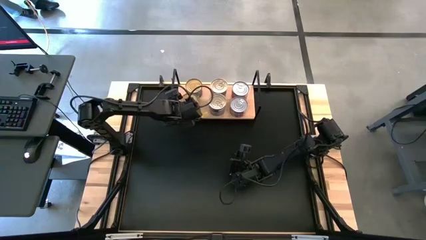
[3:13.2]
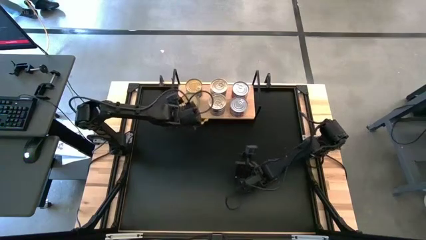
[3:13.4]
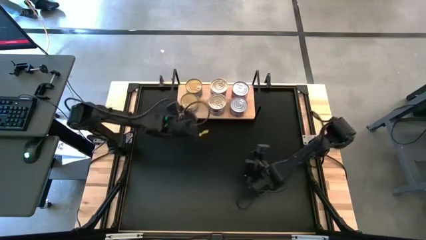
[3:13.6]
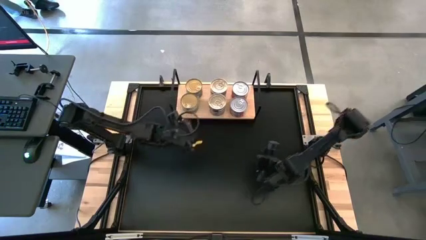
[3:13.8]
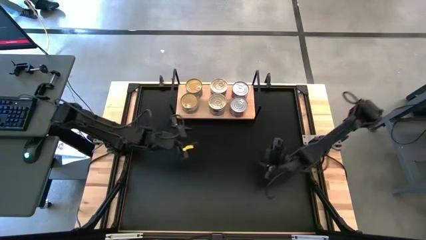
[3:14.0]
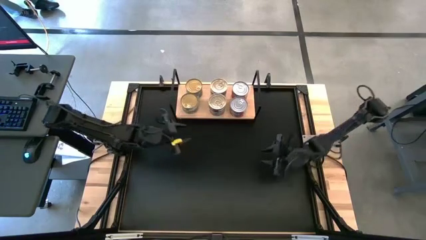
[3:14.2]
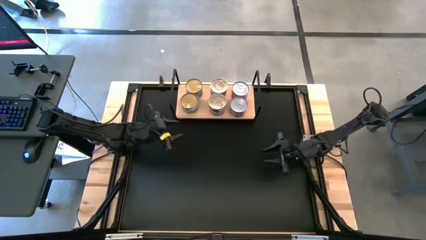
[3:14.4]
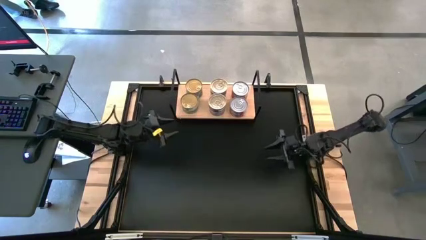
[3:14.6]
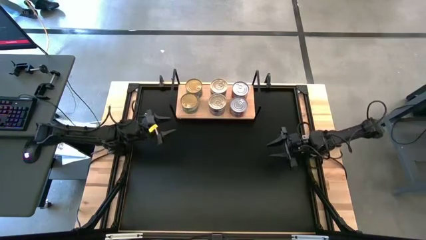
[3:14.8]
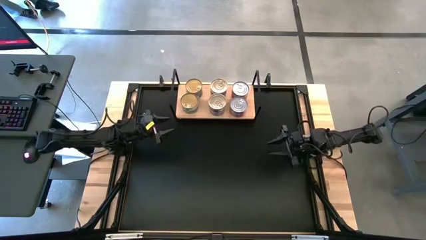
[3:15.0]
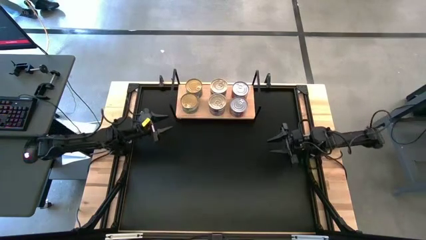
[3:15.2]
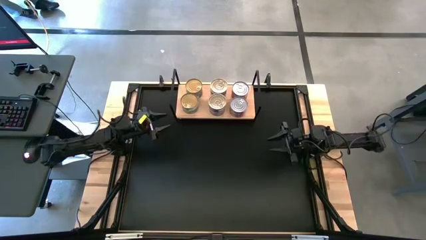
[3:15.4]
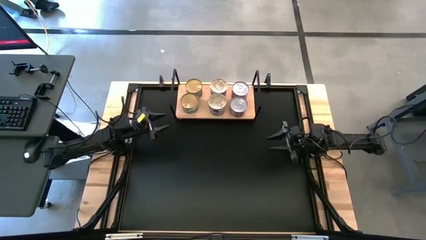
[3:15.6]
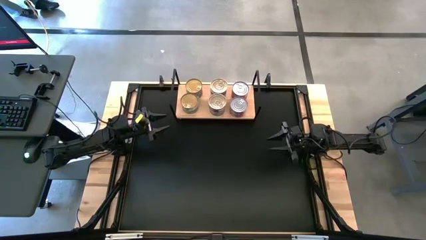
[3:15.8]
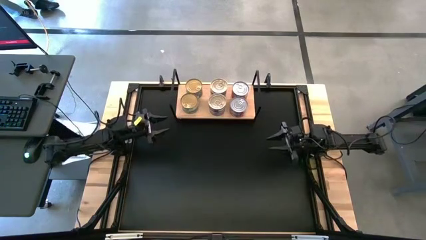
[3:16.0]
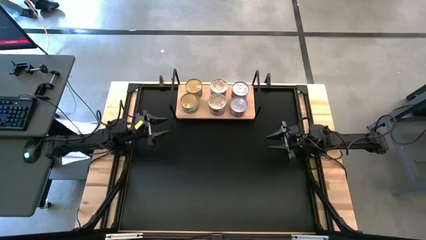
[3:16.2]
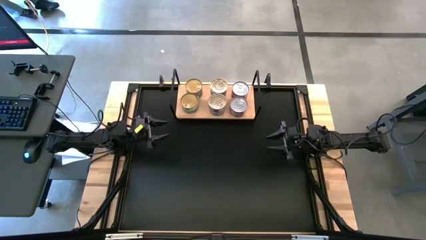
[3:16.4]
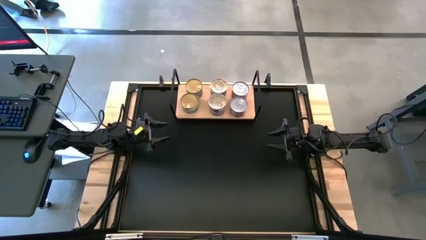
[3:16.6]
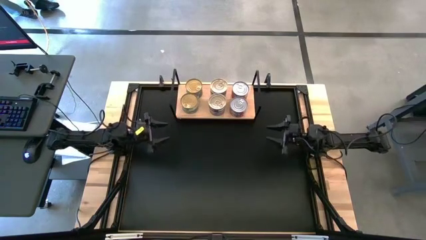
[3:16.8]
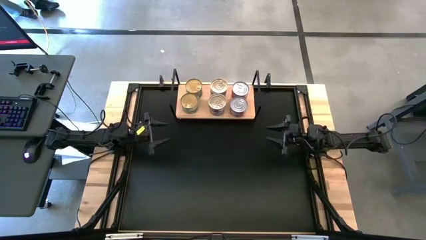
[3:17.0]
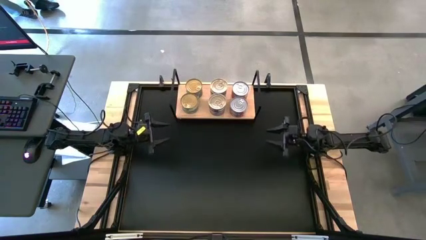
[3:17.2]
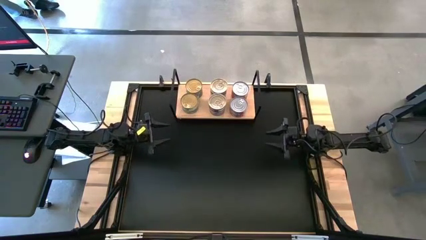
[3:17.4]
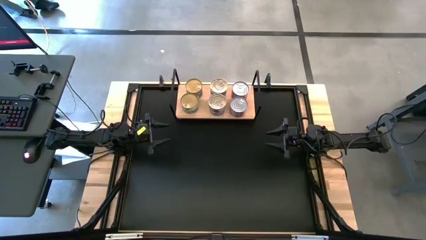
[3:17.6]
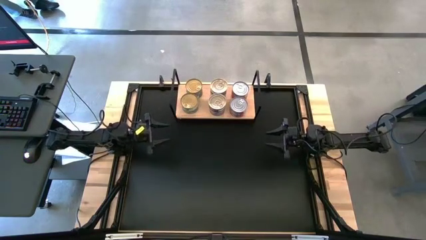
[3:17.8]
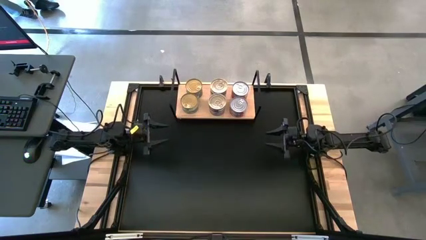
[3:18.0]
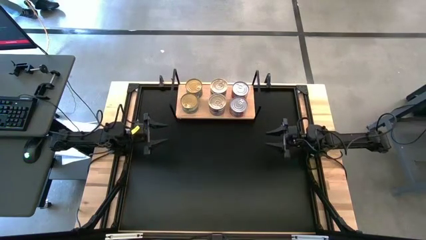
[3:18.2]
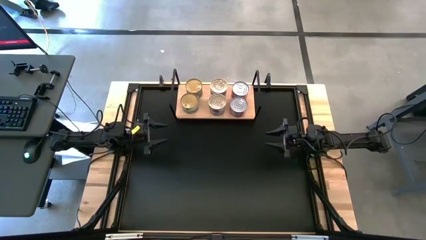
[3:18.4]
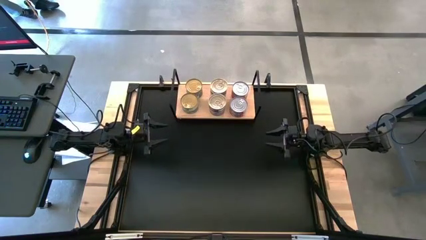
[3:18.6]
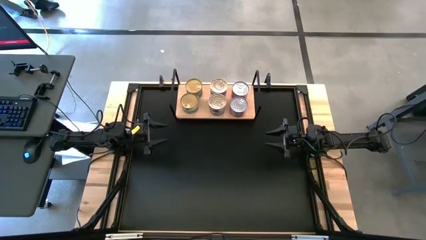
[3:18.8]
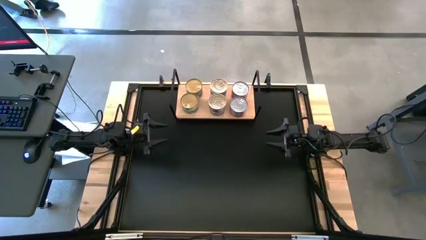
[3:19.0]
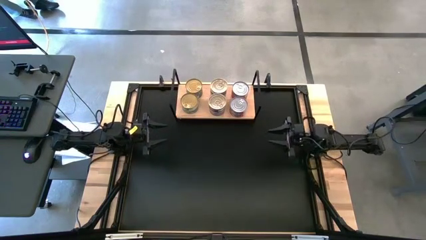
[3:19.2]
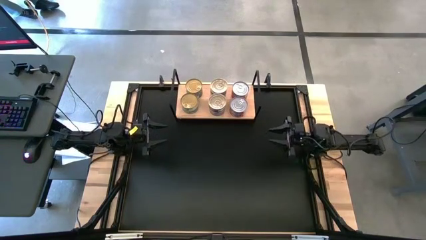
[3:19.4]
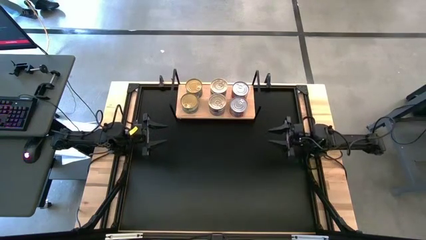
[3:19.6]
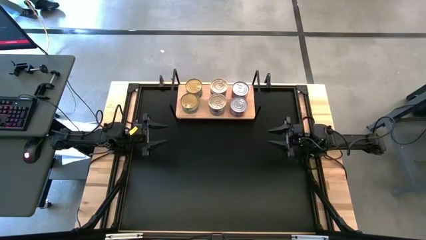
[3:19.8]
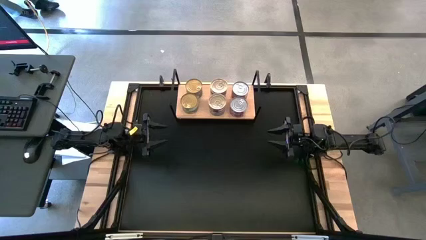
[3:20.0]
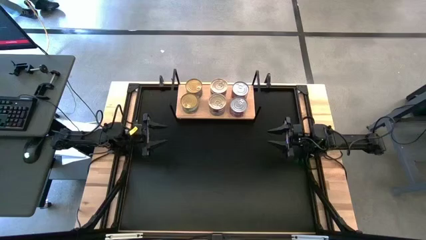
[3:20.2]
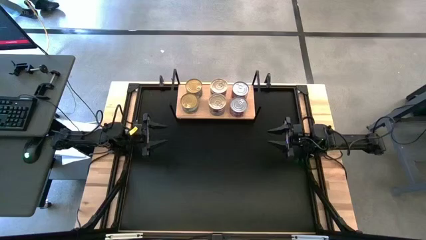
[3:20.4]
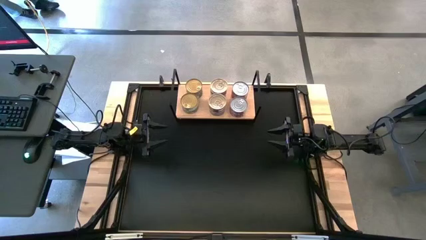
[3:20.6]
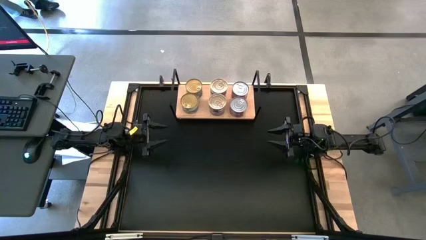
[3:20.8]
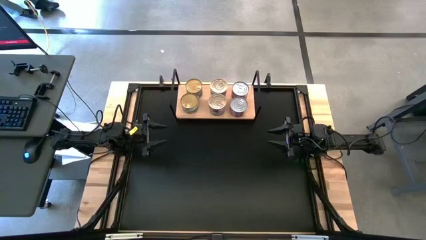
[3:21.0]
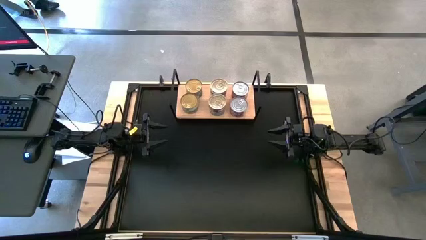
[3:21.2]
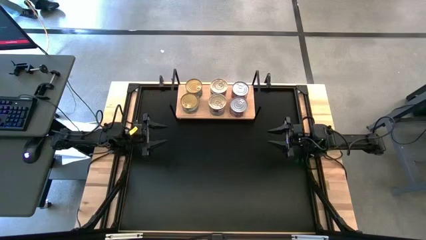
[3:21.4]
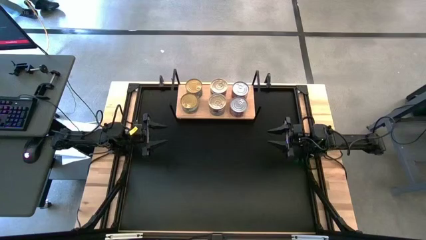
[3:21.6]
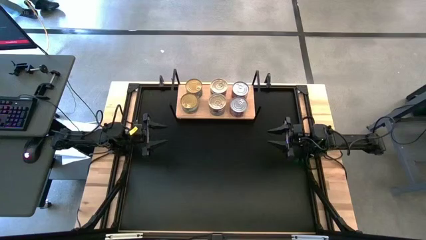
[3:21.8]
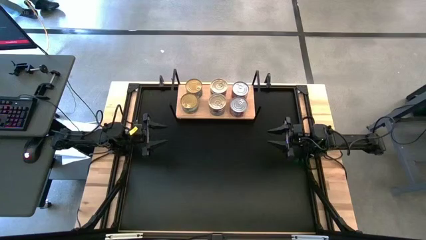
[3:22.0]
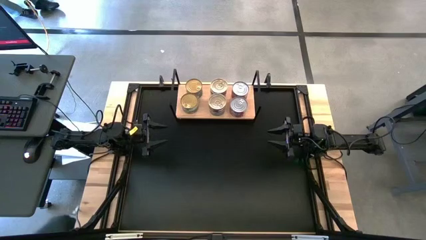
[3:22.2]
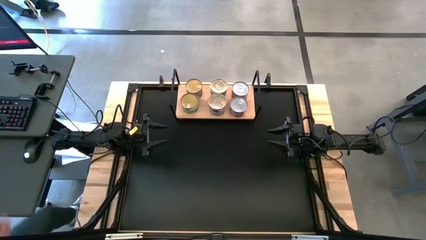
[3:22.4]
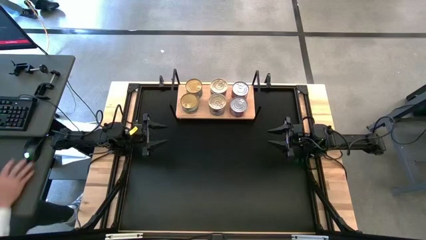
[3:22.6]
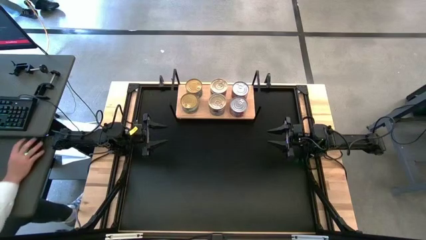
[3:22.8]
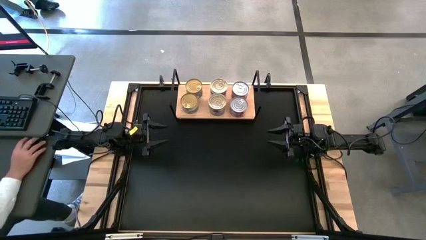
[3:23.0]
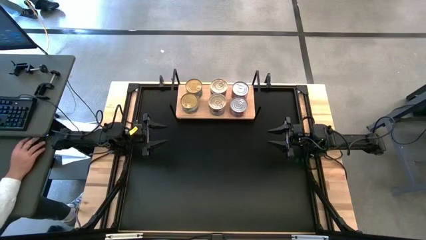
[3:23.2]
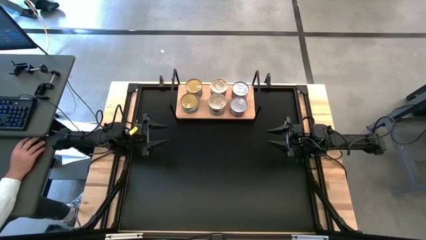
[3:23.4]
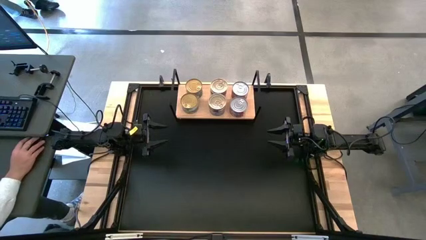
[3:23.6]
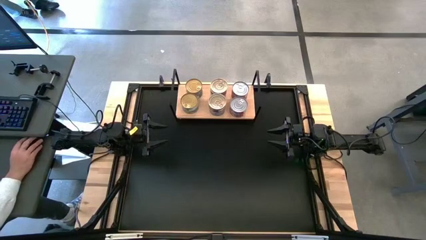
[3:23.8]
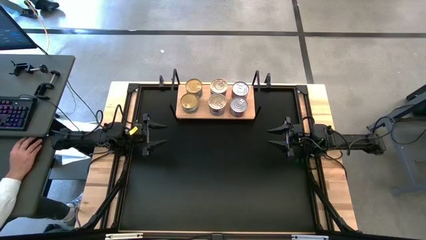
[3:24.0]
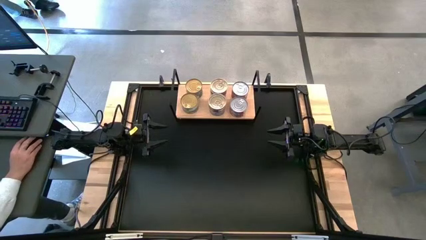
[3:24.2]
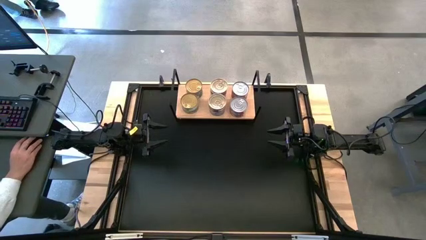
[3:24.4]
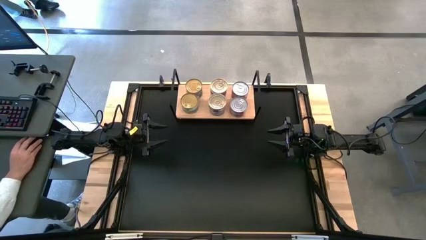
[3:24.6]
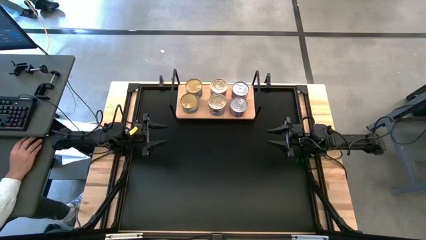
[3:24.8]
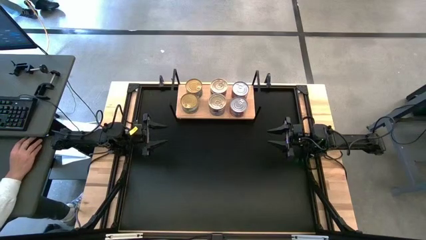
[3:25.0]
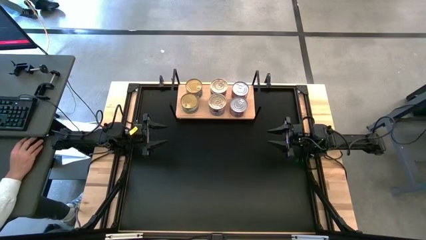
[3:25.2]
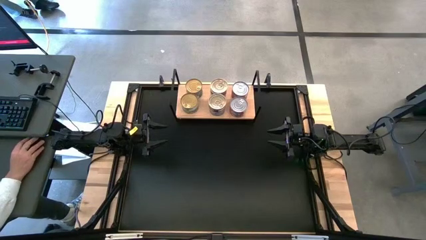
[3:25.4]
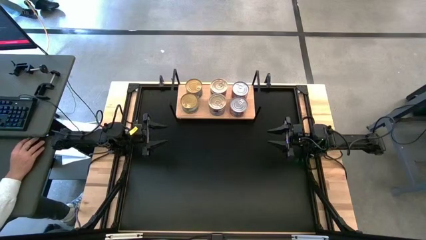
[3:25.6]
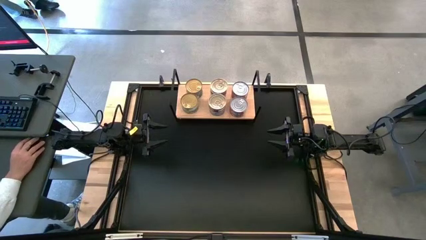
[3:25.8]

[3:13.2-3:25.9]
Task: Stack canned seafood by type on shelf
Return to Home Position

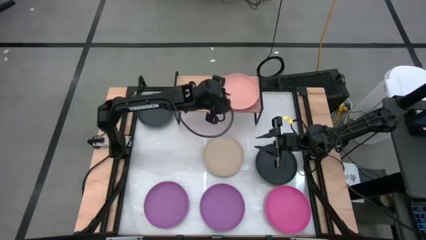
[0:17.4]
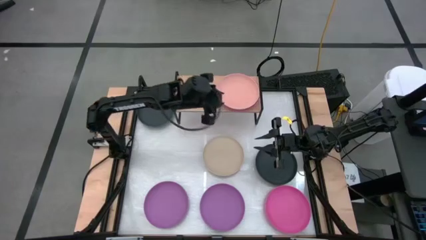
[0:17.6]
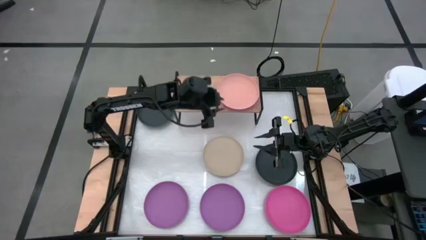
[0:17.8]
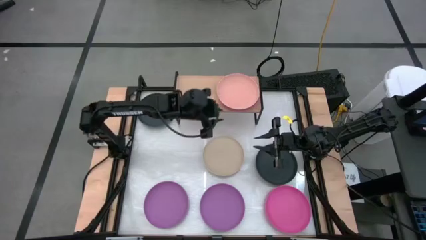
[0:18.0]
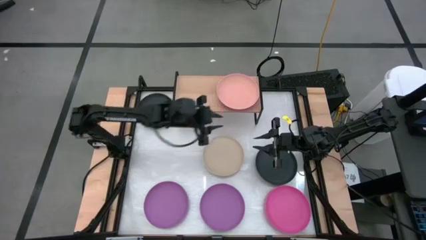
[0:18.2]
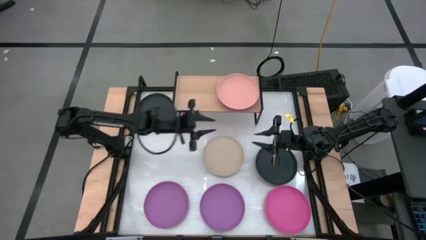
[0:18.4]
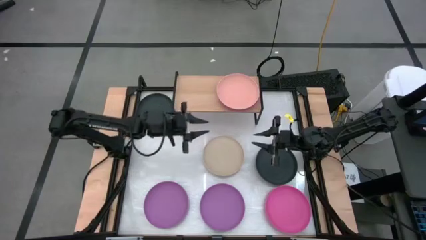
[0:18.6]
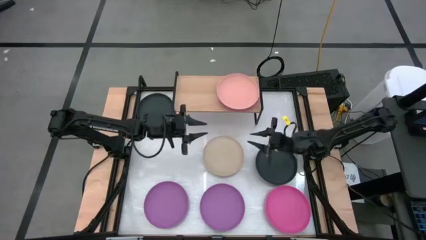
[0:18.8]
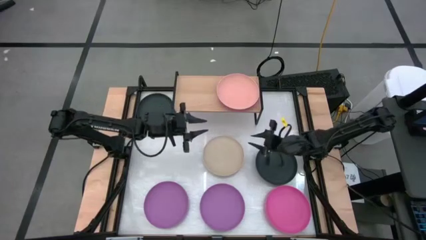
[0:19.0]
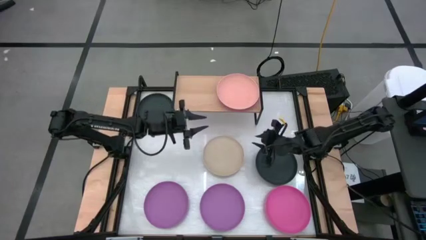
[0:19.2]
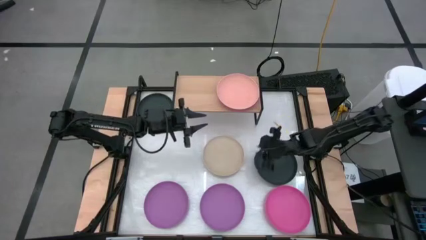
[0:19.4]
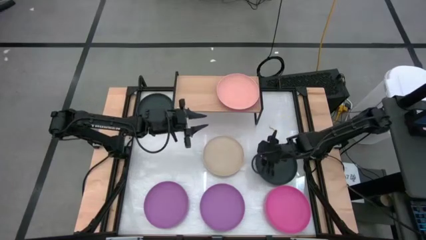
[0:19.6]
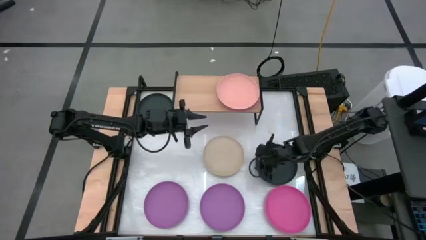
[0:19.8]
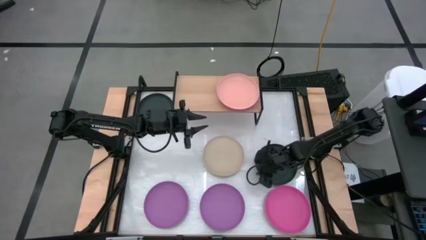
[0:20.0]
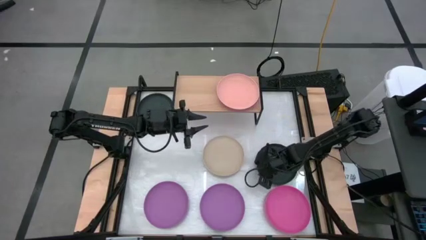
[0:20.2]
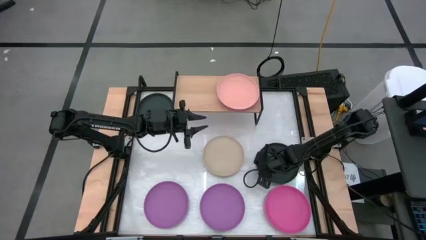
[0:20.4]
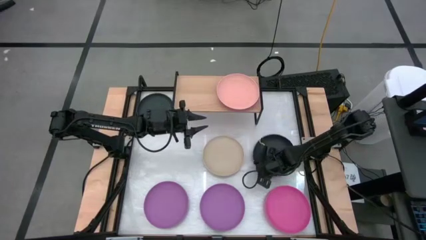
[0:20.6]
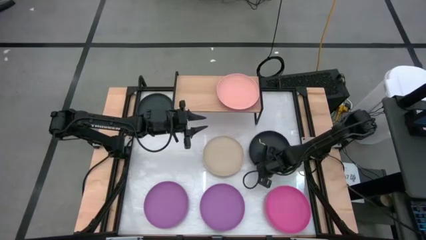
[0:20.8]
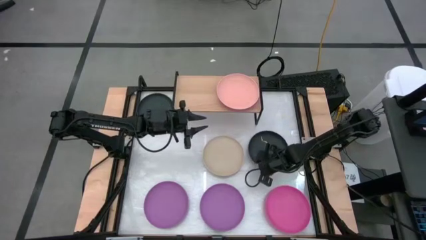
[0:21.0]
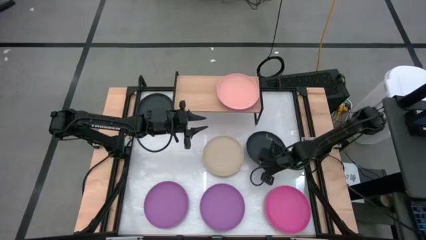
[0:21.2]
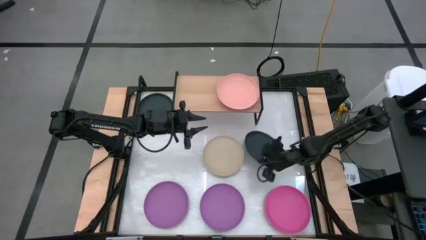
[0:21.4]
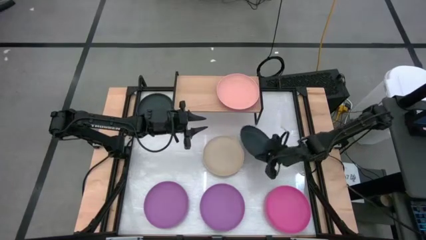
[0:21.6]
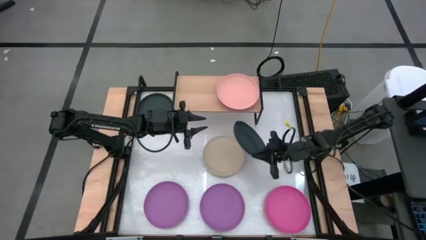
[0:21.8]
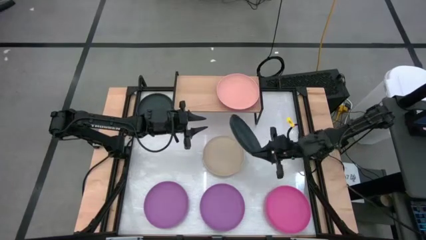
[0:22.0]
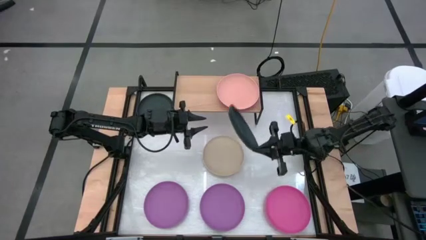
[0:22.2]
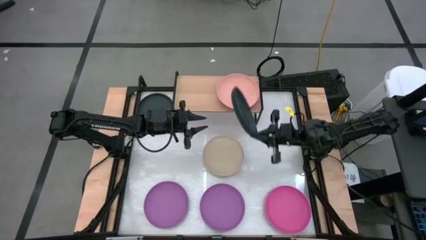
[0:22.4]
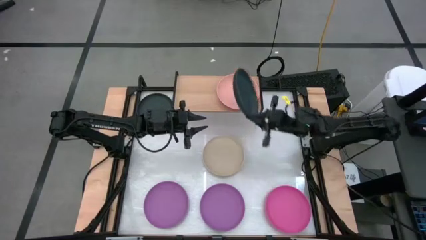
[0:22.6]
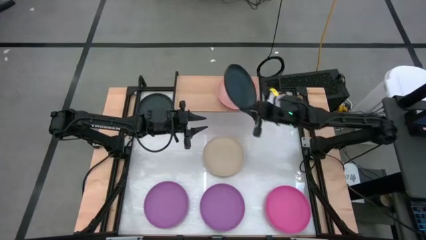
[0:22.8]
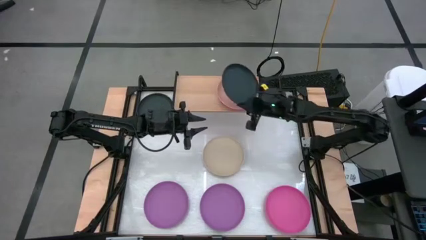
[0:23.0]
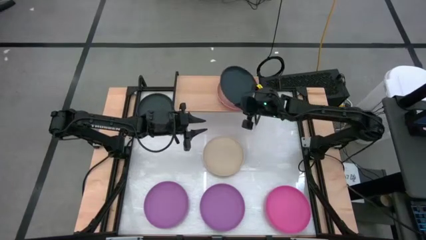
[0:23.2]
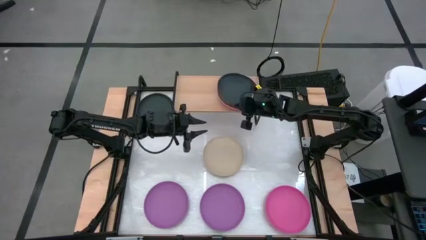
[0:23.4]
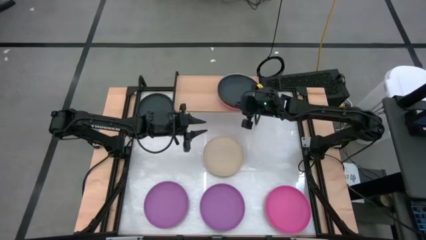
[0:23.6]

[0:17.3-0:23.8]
Task: Place and stack plates onto a shelf
Stack the bottom black plate on top of the light pink plate on the shelf
